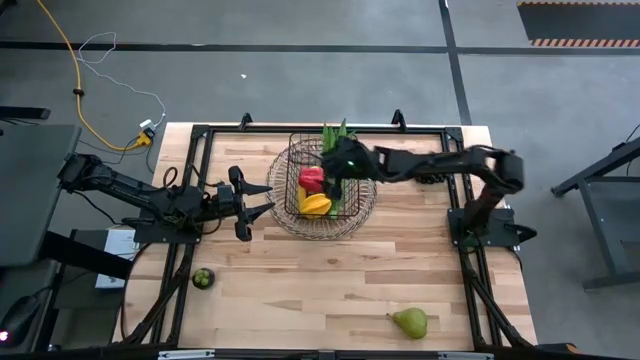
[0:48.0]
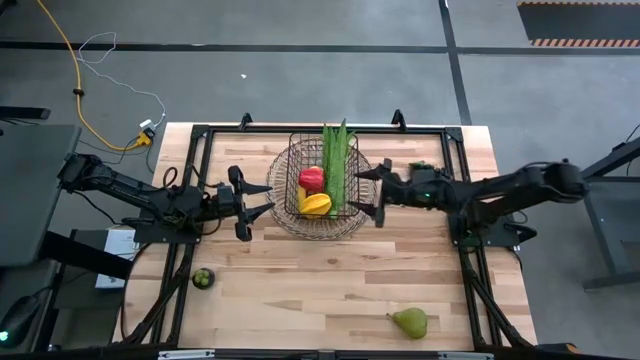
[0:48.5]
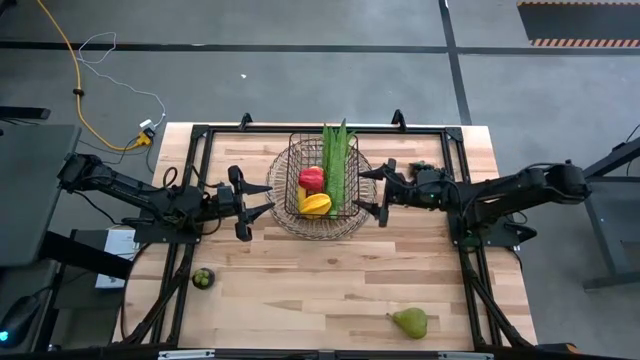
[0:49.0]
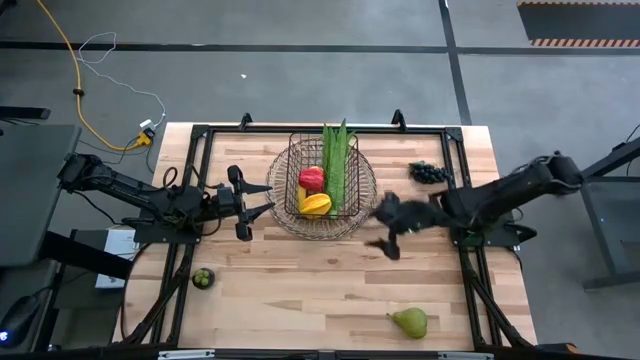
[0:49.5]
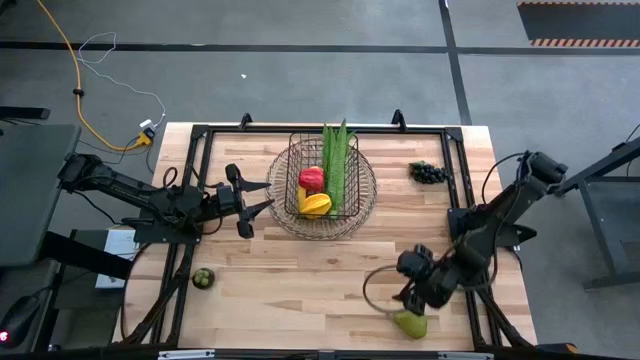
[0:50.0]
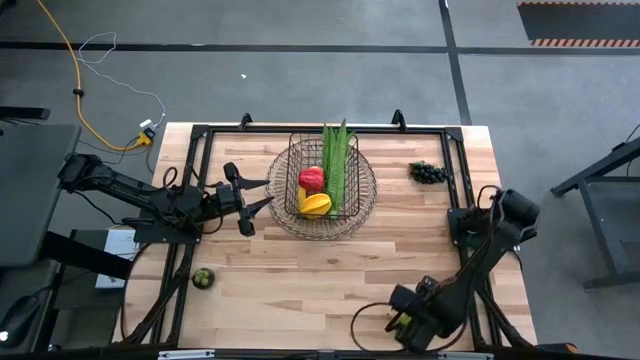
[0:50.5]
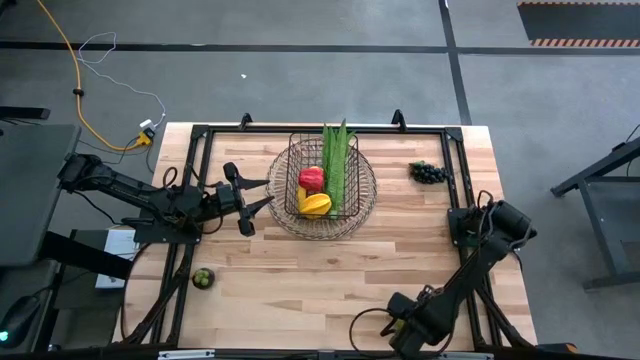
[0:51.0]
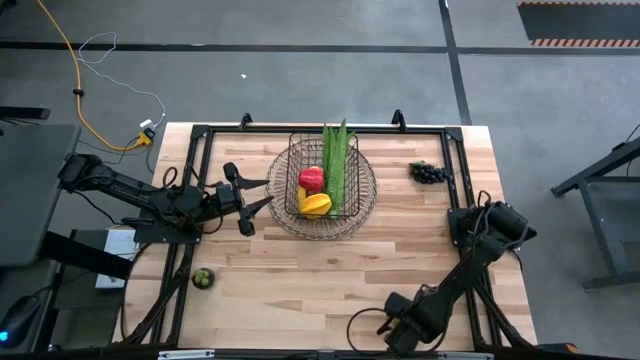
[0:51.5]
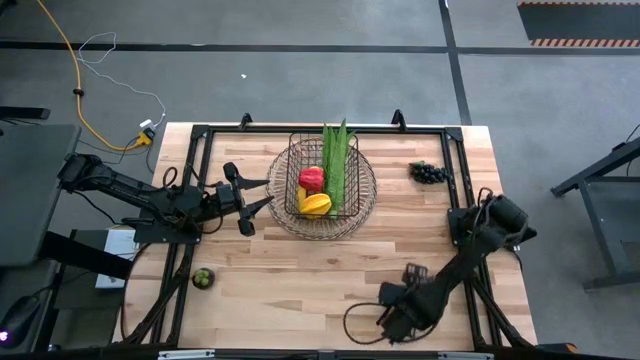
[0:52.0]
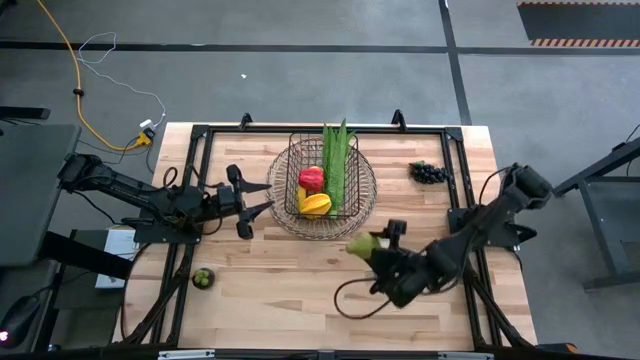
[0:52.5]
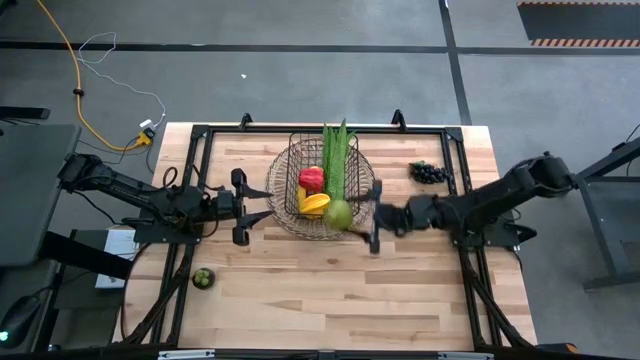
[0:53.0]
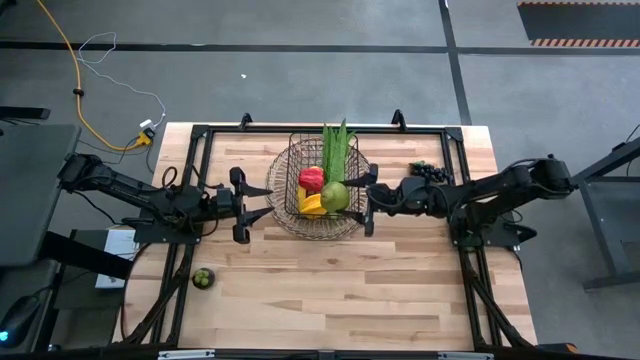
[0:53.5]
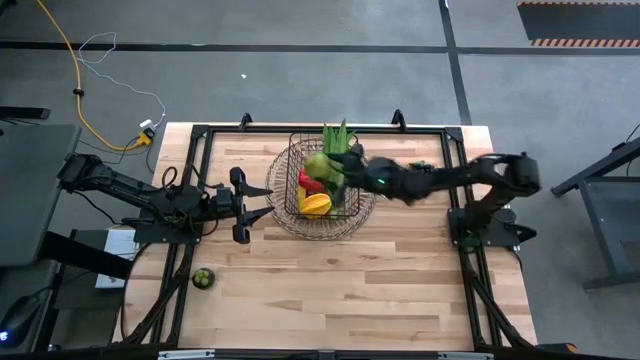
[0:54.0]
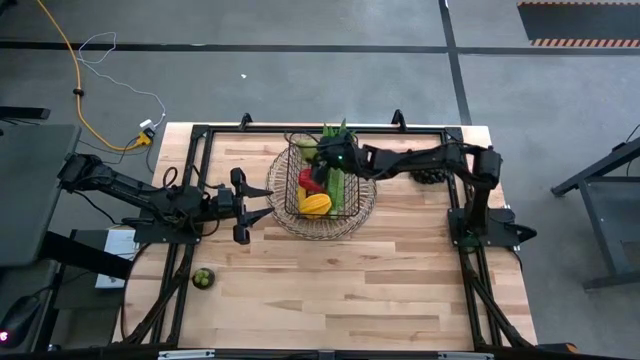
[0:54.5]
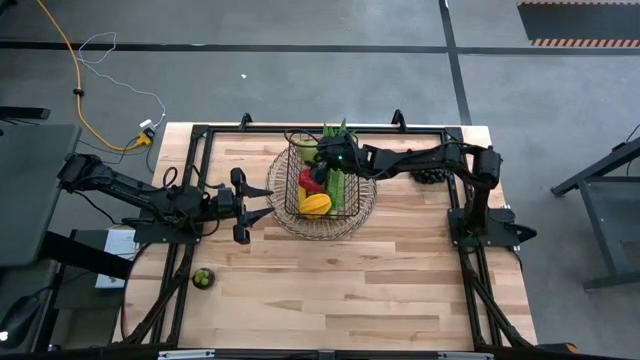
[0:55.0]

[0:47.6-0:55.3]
Task: Build produce basket
Put the green pear into the black wire basket

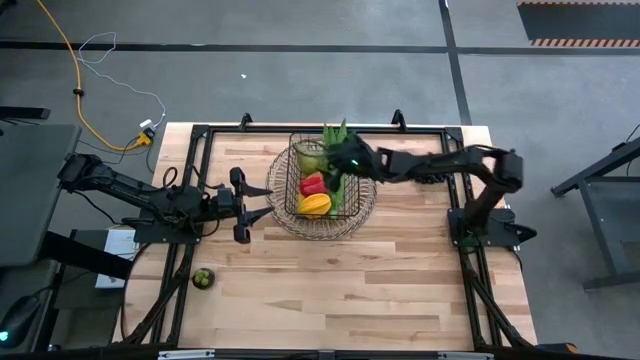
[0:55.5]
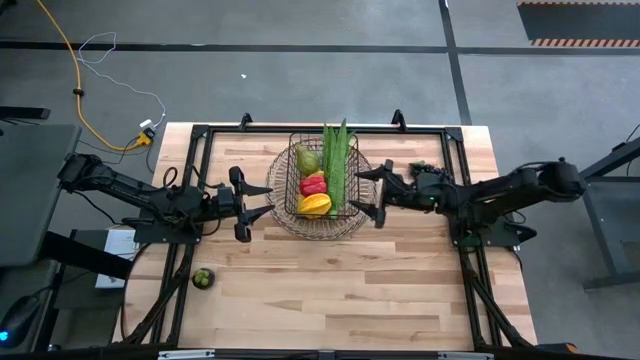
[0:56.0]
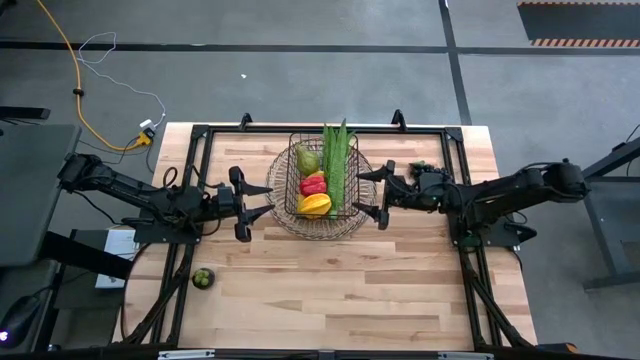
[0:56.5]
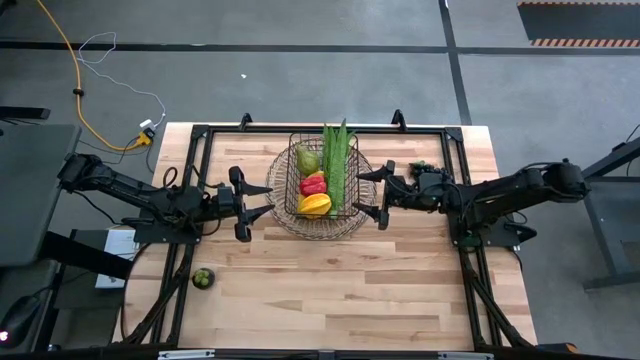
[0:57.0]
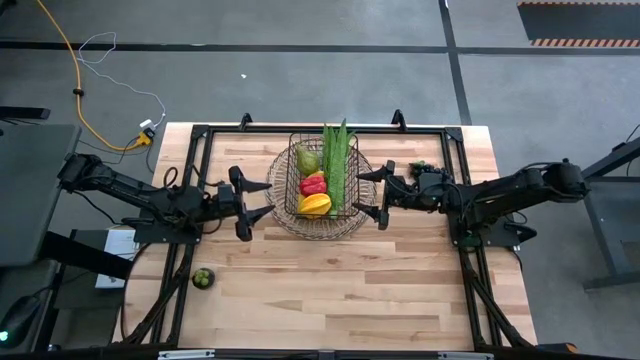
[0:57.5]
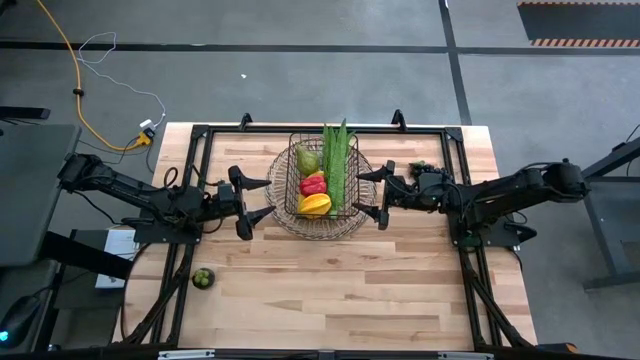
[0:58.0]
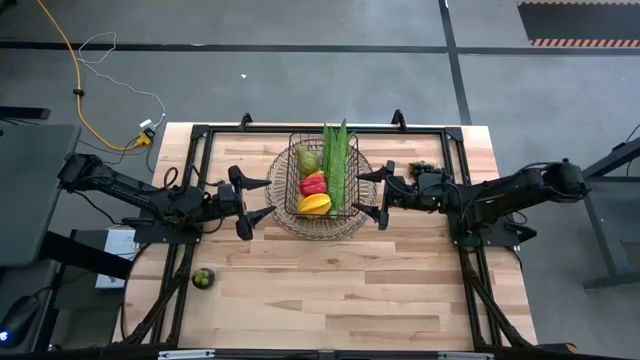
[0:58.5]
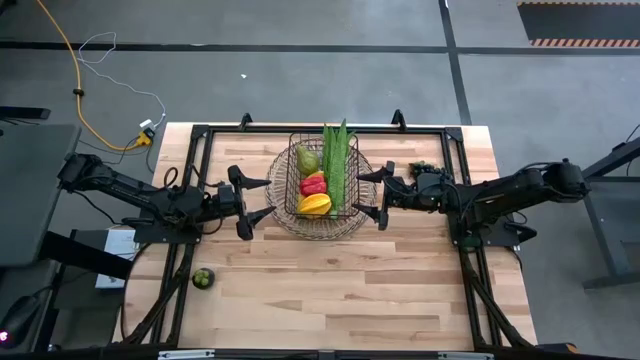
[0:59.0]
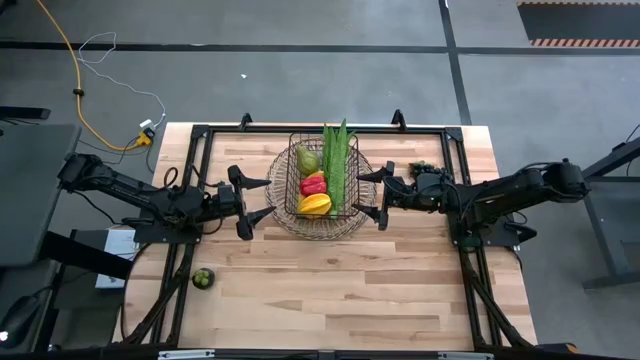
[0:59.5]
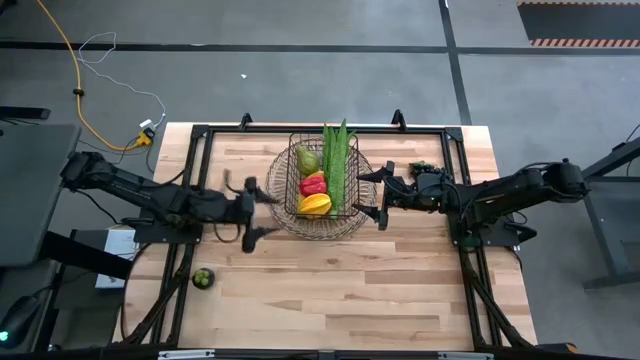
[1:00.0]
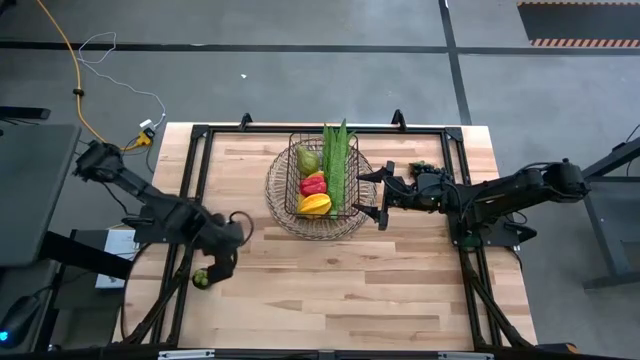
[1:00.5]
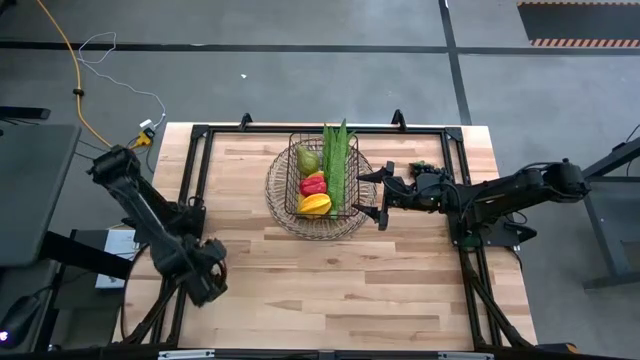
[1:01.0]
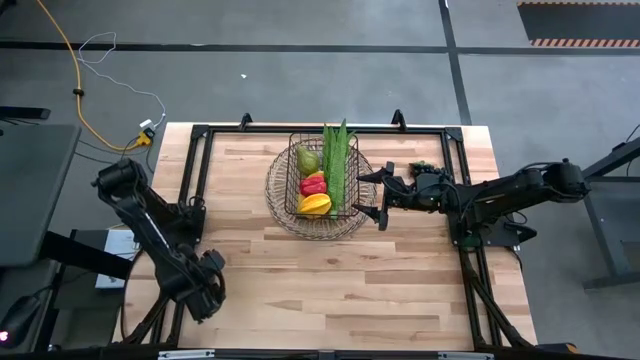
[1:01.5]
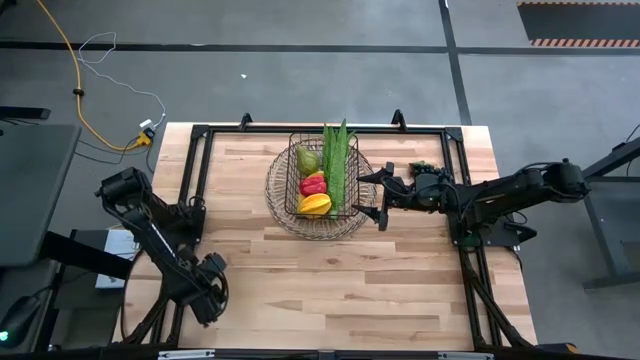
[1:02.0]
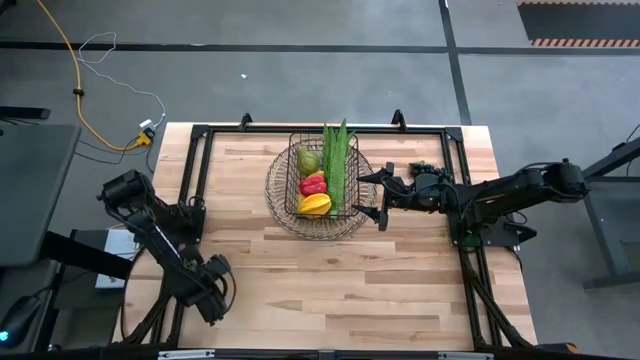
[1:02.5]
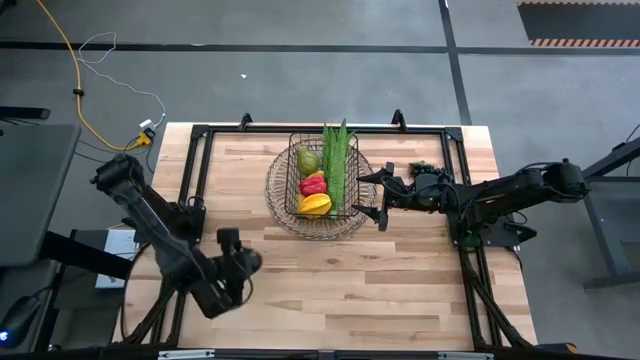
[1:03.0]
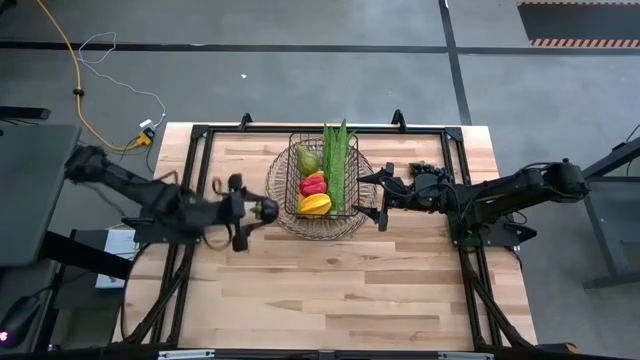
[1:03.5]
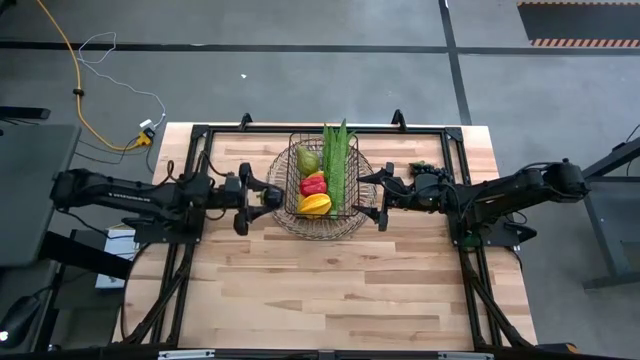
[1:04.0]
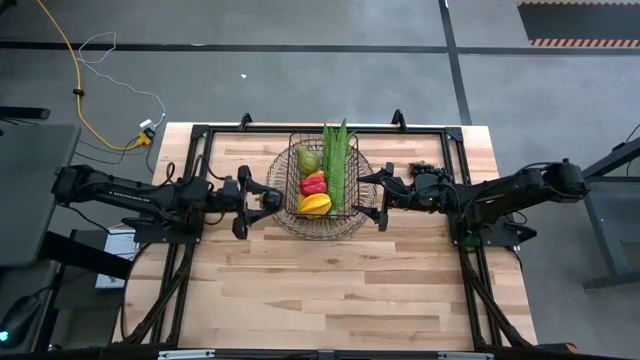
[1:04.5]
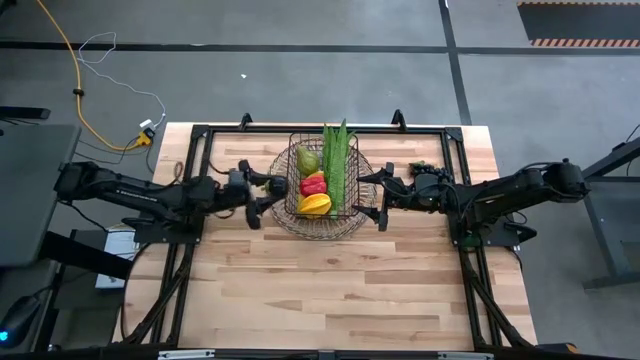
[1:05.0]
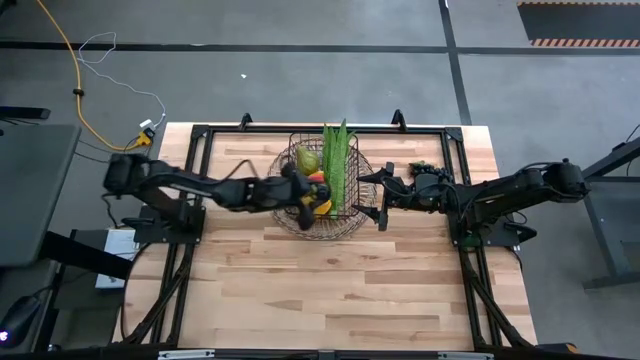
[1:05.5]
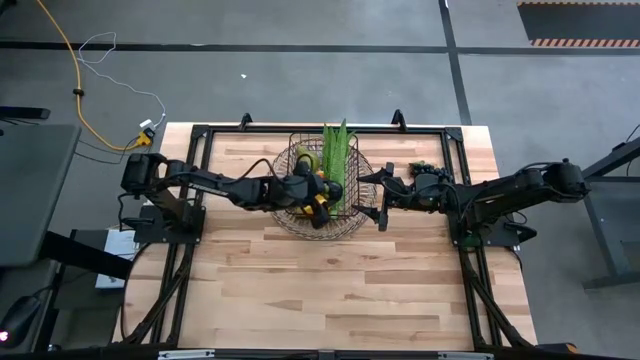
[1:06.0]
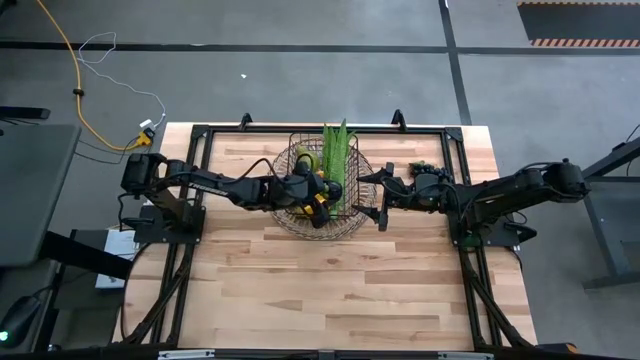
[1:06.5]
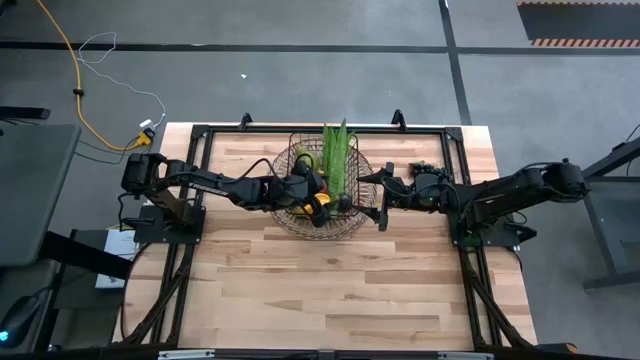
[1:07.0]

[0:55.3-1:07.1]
Put the violet mangosteen into the black wire basket

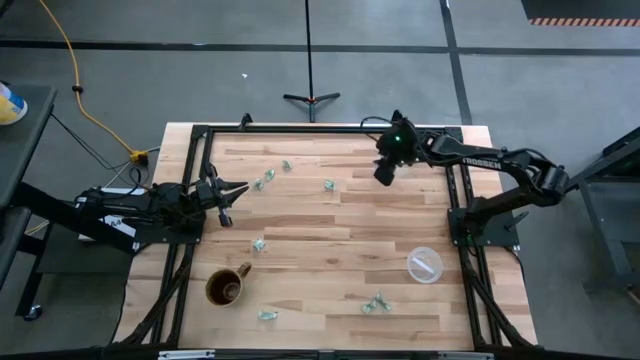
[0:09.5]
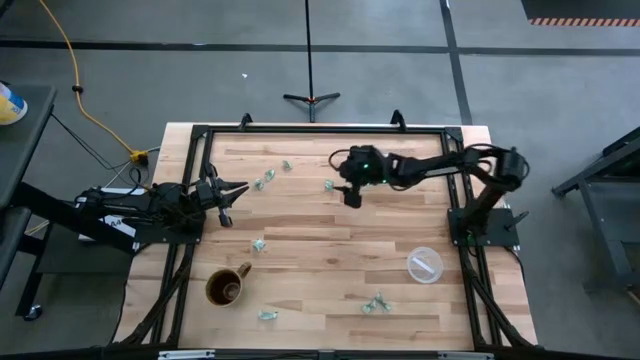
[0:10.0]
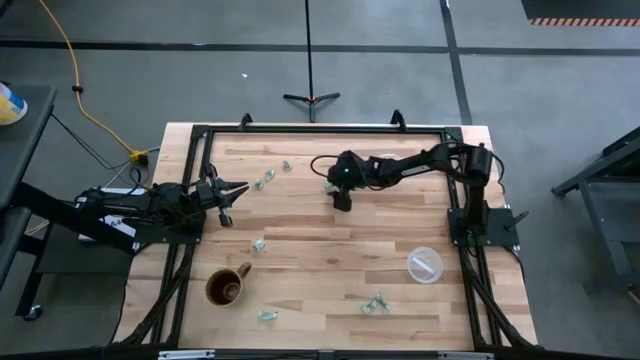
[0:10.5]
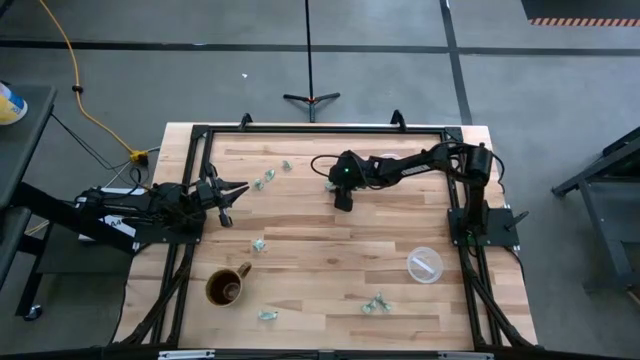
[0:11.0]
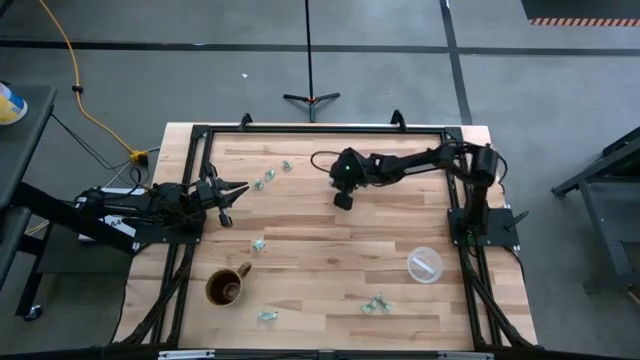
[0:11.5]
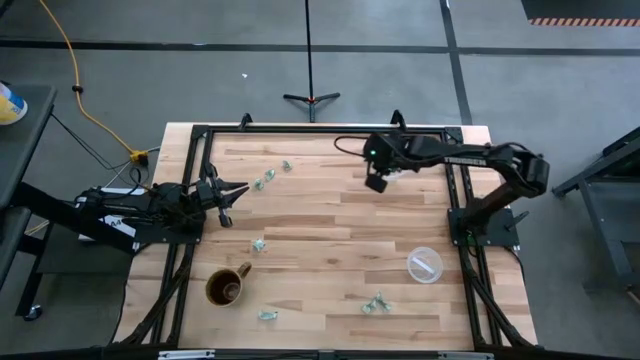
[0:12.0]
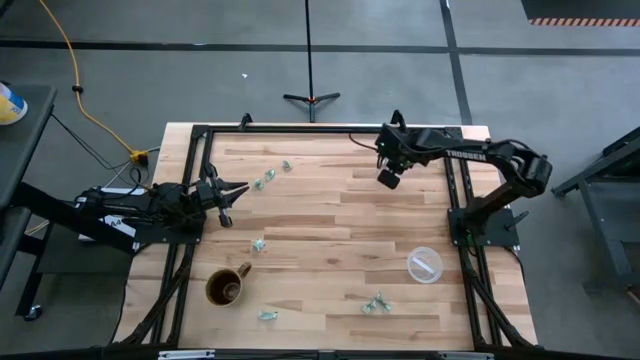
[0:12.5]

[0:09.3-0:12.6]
Task: Pick and place items into bin
Put the green stevia packet into the top transparent bin
